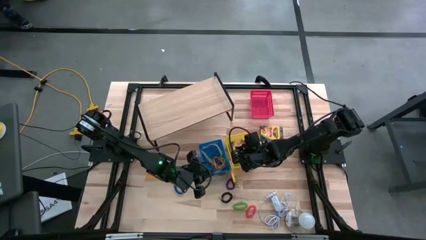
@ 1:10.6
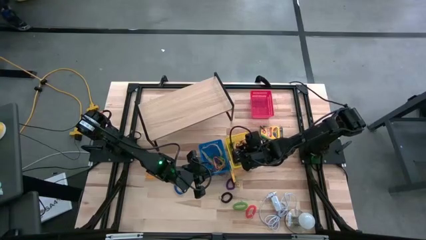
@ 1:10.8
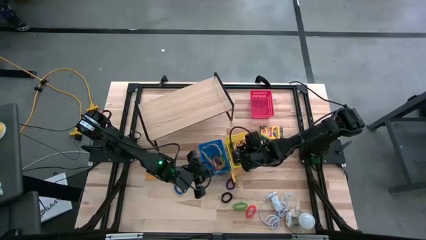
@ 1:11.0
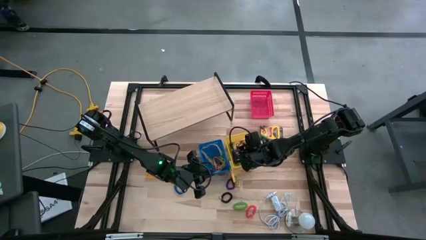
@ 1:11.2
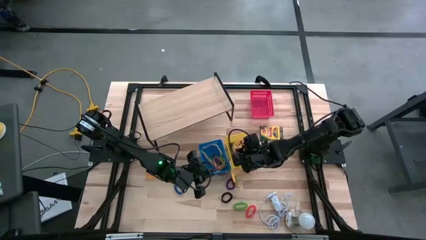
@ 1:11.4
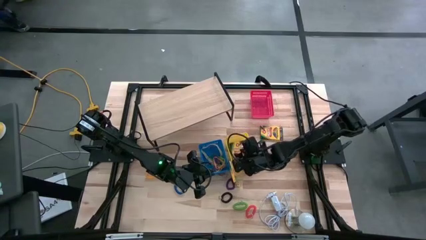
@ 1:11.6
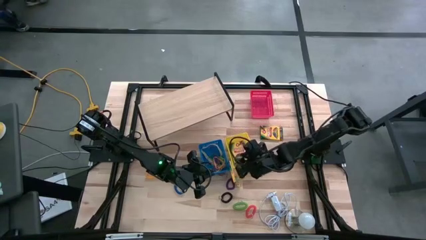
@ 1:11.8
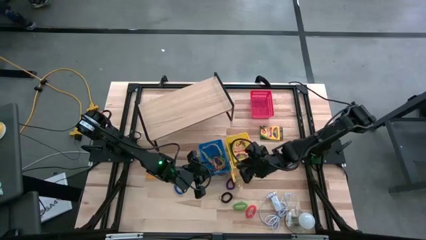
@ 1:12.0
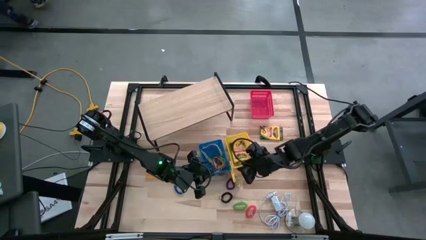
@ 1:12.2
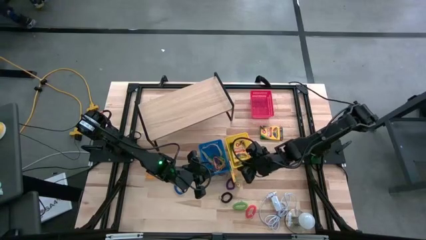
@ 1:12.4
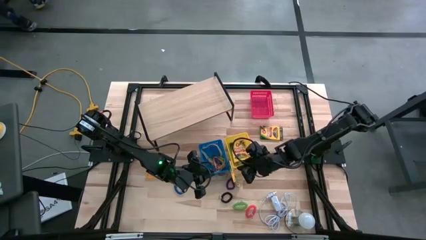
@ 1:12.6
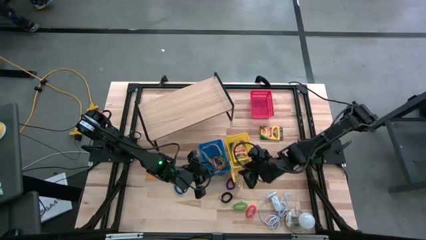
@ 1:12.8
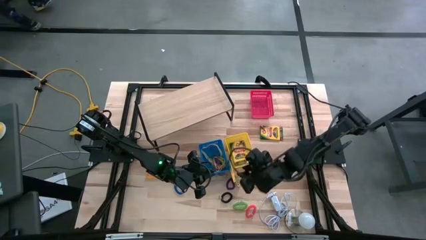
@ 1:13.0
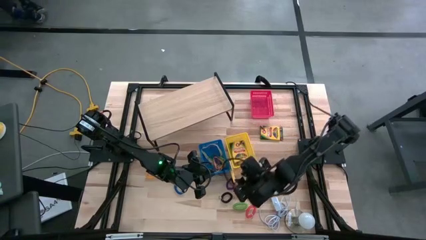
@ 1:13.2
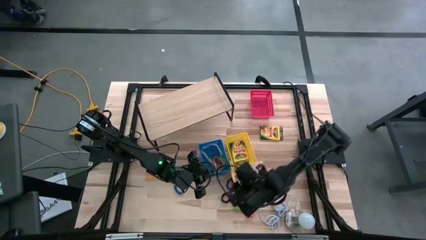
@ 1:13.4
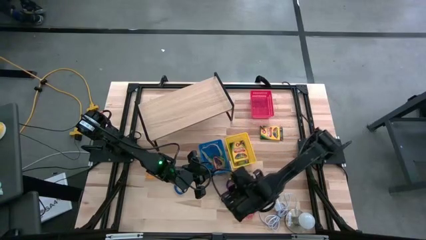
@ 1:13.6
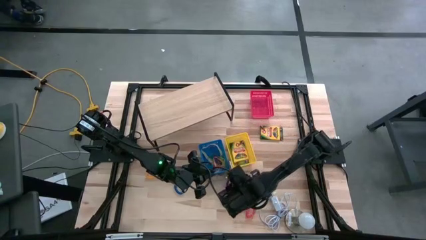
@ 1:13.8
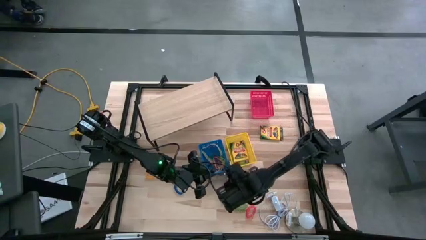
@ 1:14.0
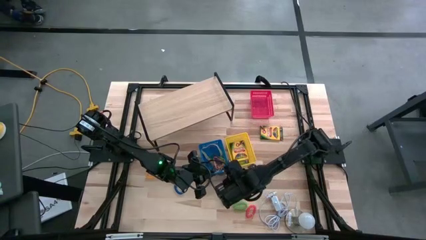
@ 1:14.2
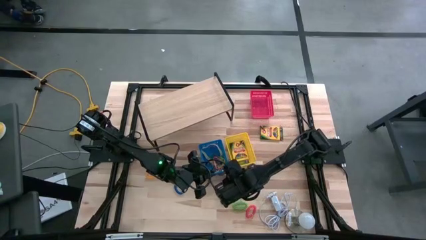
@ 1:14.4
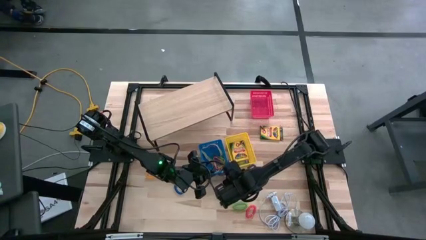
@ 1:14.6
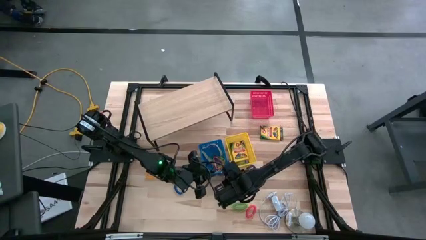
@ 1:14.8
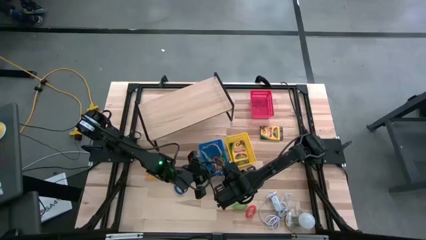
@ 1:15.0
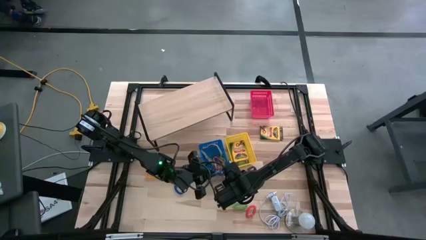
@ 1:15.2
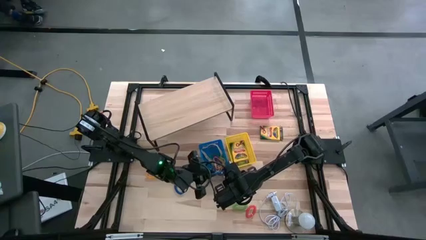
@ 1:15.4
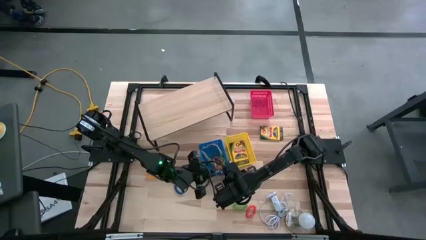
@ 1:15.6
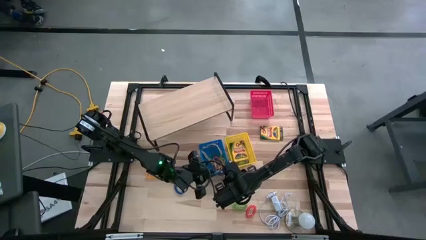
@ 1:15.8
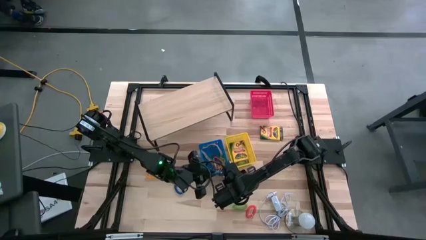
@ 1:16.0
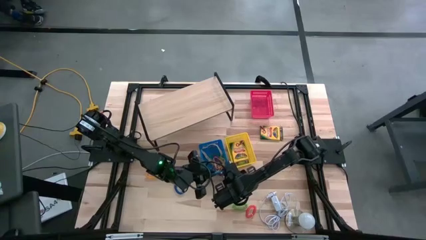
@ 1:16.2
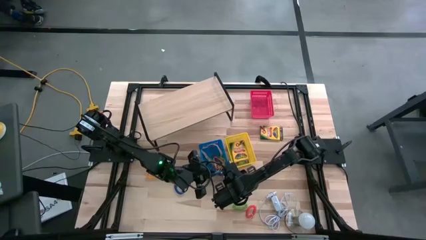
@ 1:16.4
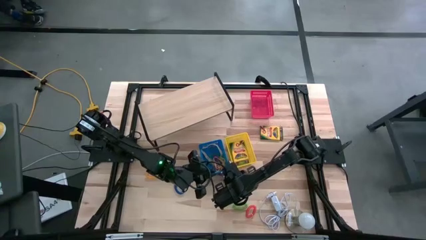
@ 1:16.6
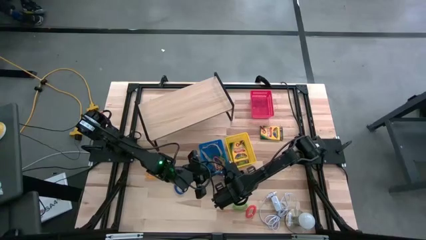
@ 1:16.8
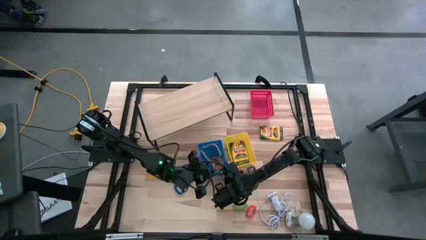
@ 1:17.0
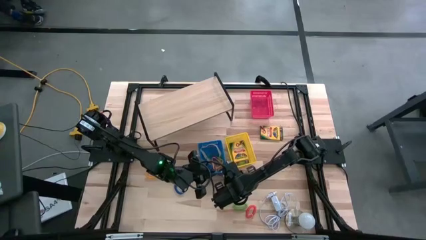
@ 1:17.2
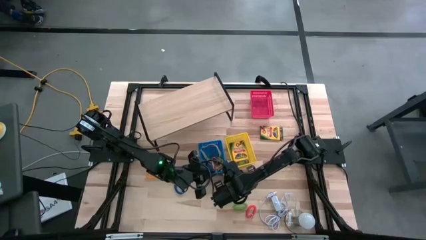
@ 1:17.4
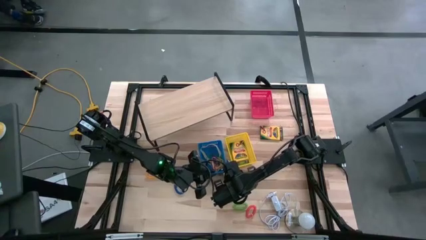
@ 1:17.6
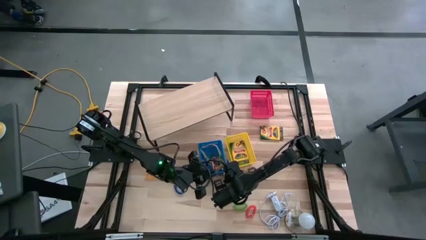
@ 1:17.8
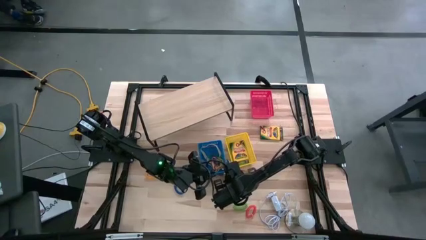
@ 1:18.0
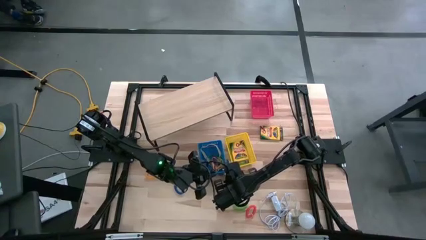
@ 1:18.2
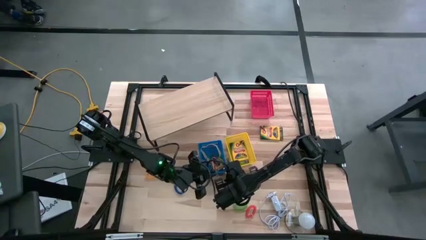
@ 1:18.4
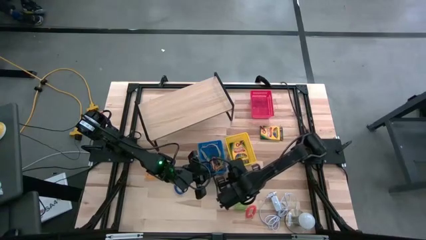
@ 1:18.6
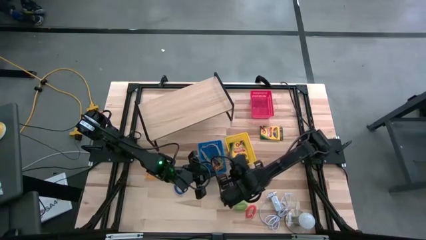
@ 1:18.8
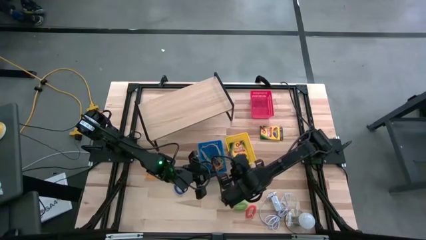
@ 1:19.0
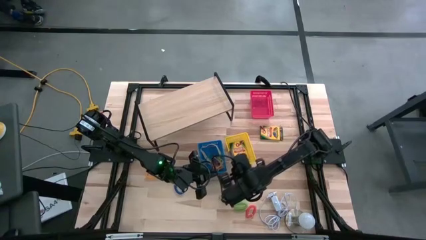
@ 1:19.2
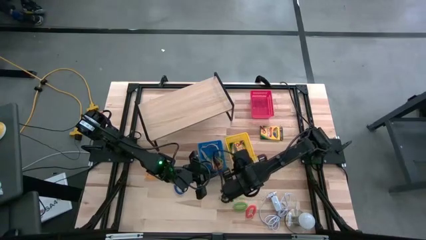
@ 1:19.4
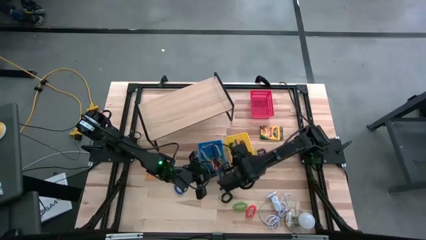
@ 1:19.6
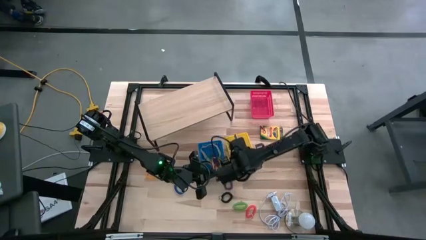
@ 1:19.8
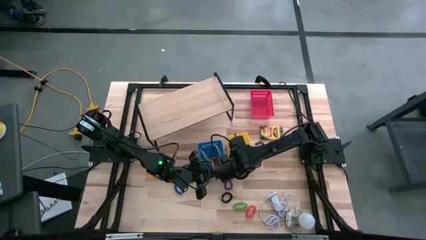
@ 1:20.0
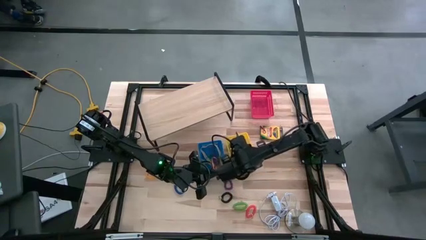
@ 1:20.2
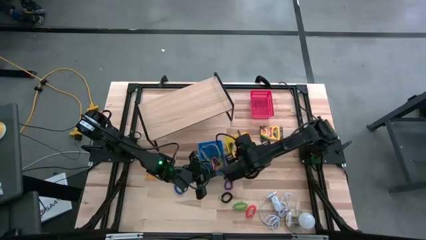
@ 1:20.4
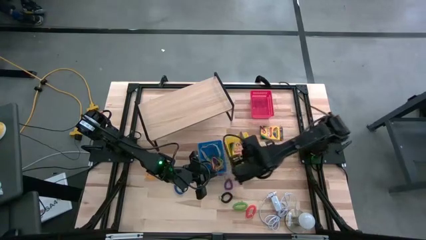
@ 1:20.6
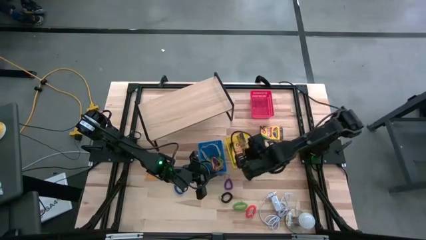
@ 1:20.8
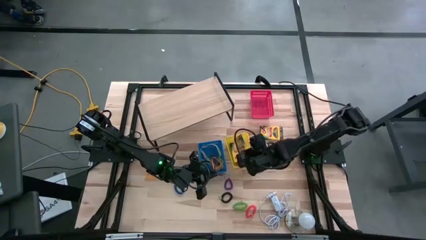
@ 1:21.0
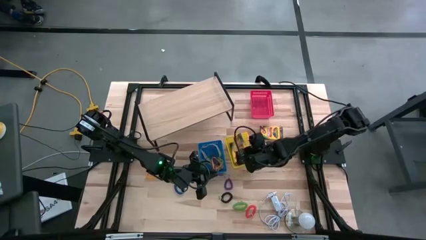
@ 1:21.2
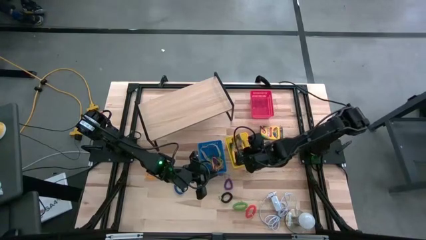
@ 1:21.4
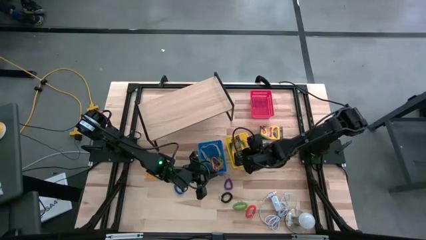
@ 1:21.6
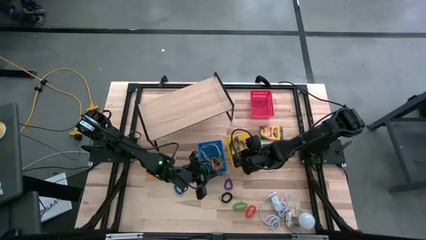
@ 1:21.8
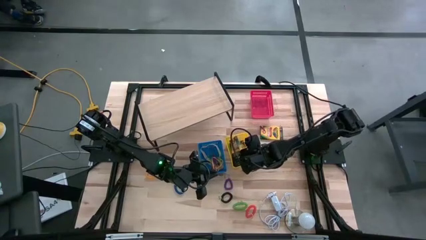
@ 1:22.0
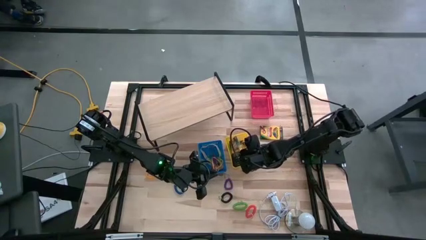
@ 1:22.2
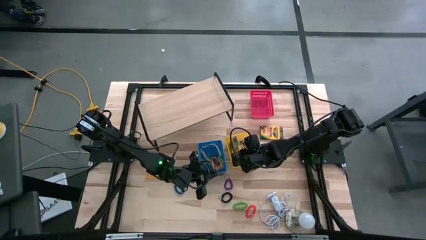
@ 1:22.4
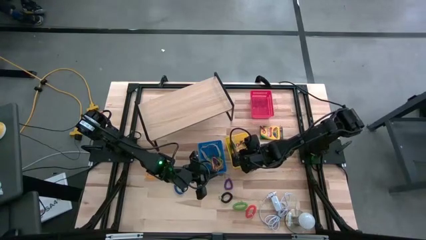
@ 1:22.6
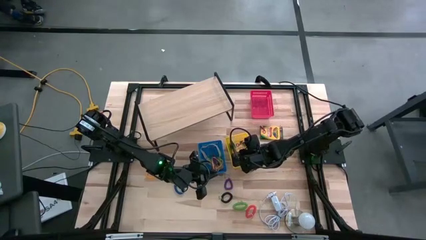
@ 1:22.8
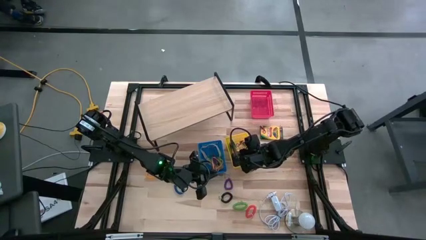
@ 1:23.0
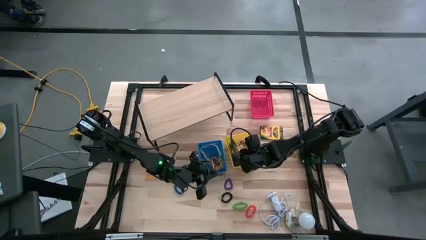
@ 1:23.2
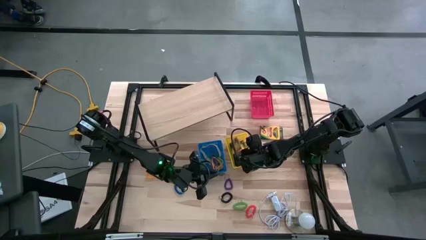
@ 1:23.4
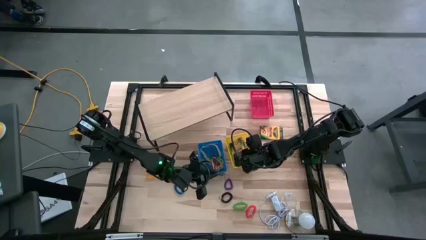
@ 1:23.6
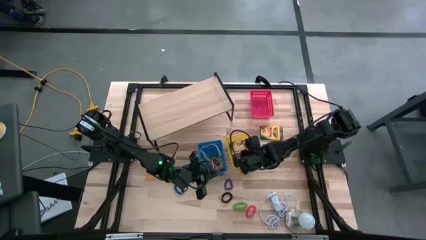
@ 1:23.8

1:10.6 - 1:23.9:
Task: Pick & Place Office Desk Supplies
Put the bottom yellow crayon box into the yellow bin
